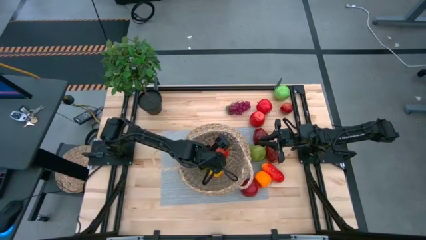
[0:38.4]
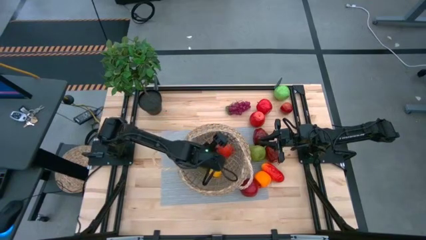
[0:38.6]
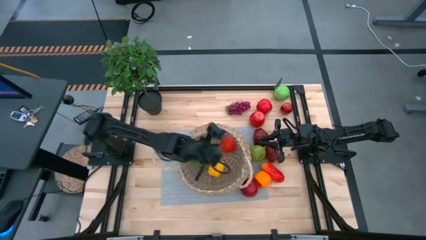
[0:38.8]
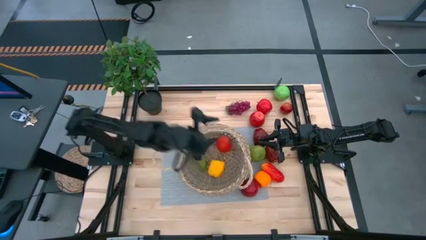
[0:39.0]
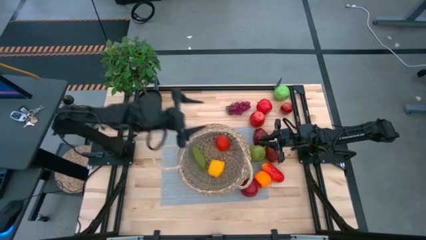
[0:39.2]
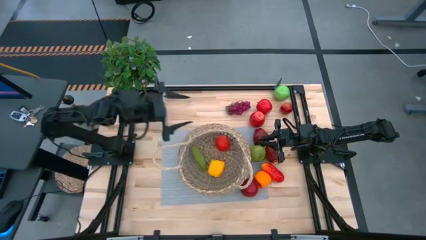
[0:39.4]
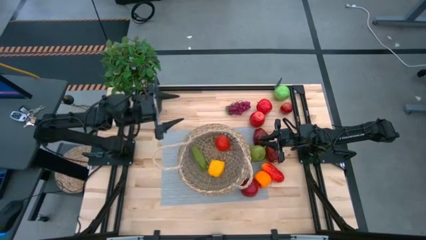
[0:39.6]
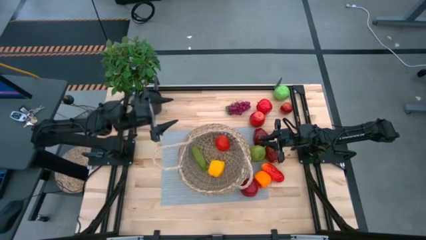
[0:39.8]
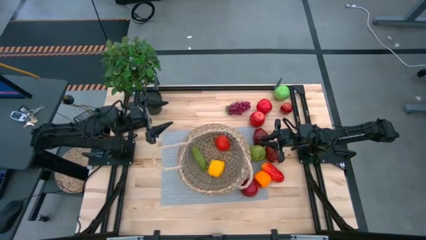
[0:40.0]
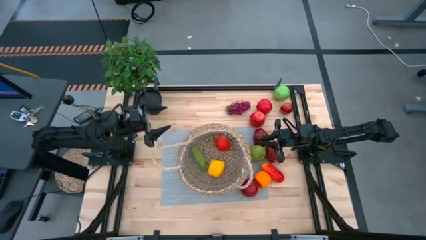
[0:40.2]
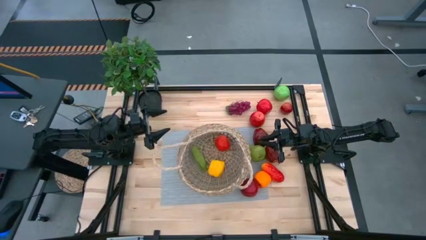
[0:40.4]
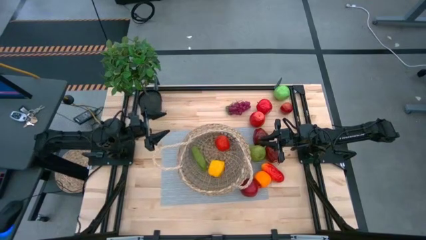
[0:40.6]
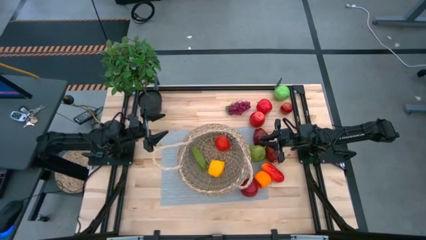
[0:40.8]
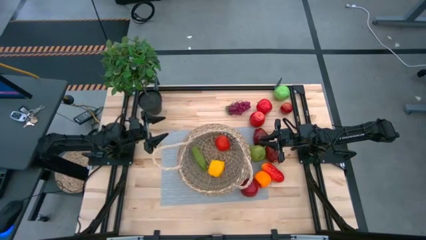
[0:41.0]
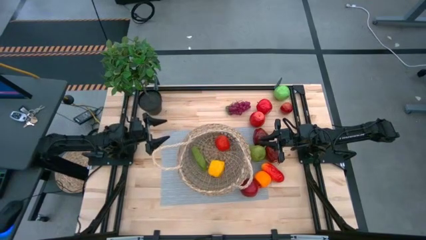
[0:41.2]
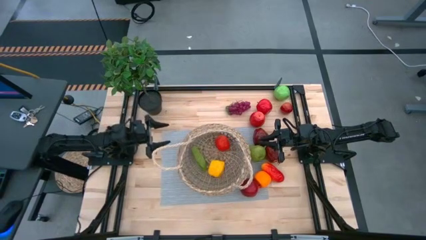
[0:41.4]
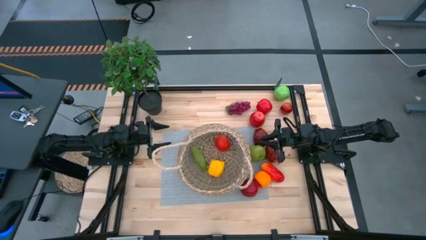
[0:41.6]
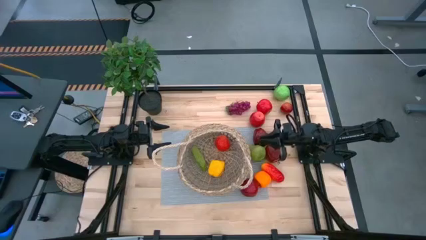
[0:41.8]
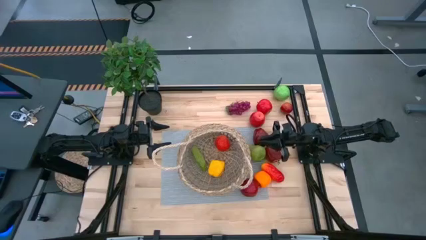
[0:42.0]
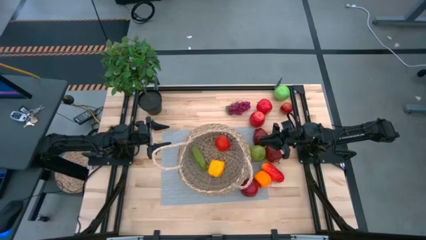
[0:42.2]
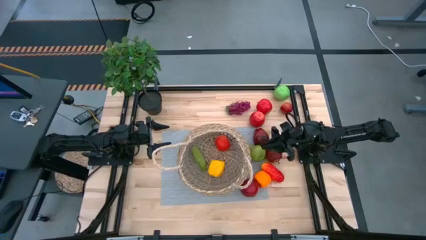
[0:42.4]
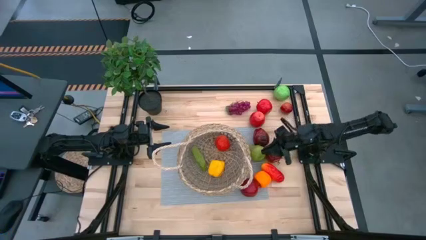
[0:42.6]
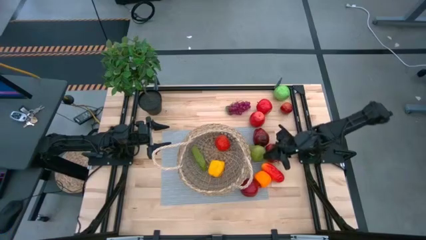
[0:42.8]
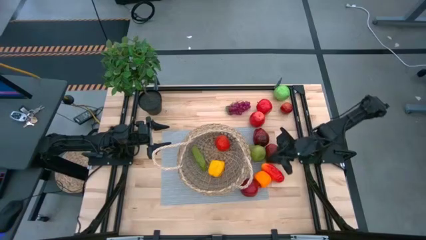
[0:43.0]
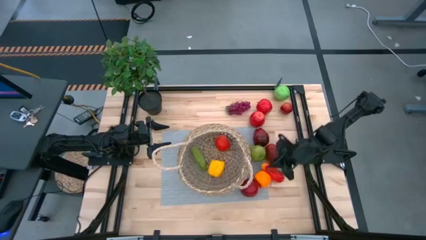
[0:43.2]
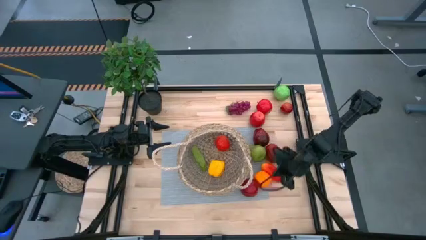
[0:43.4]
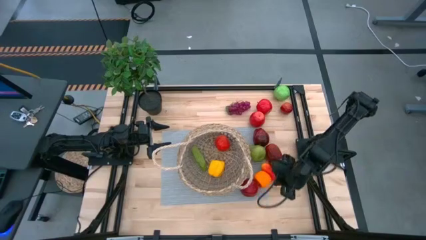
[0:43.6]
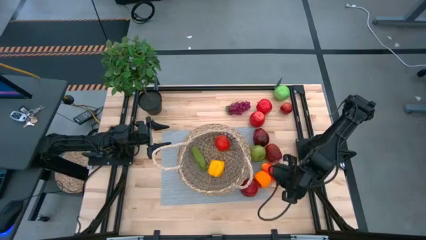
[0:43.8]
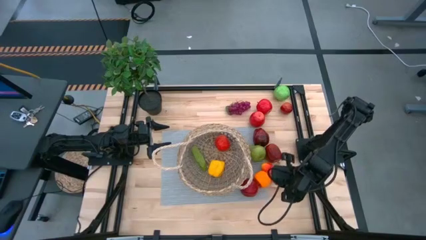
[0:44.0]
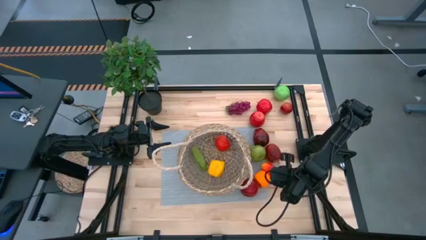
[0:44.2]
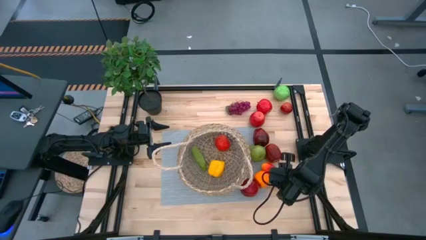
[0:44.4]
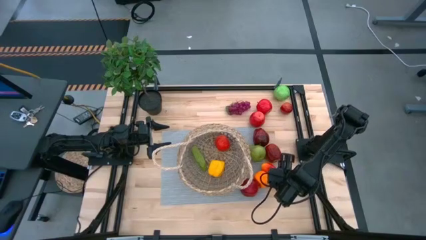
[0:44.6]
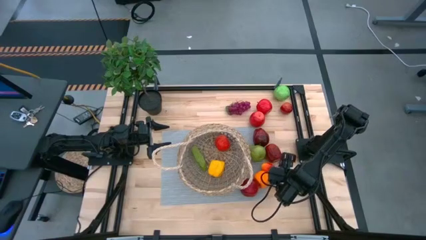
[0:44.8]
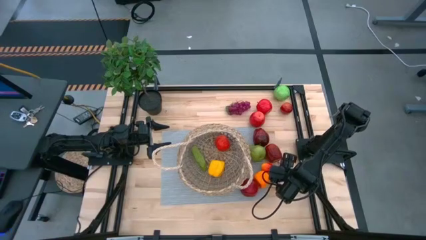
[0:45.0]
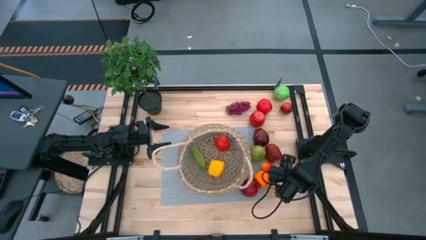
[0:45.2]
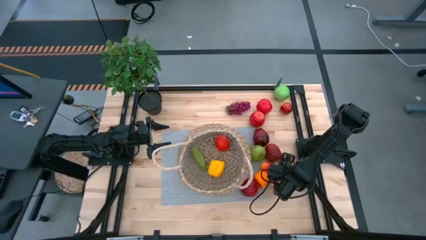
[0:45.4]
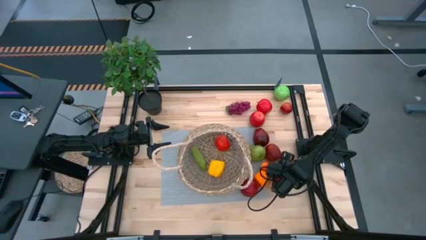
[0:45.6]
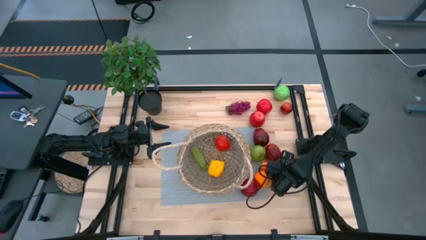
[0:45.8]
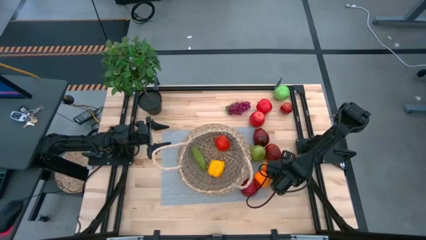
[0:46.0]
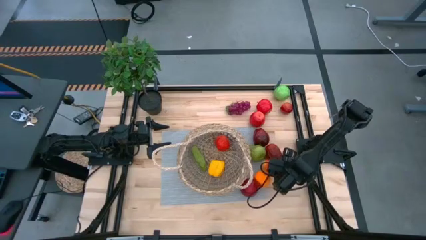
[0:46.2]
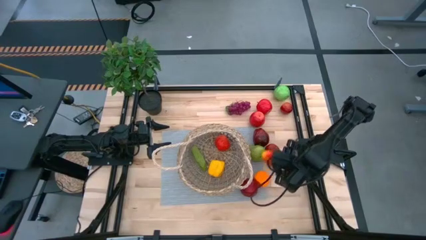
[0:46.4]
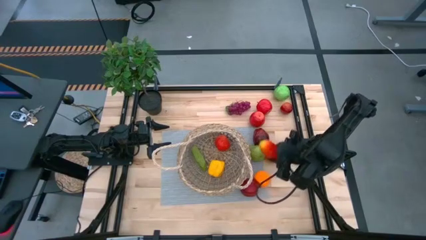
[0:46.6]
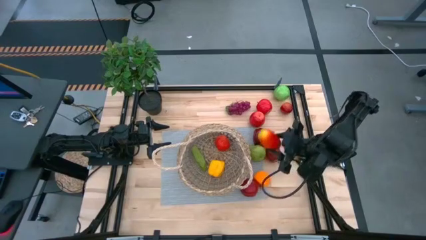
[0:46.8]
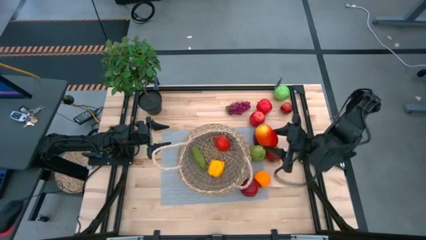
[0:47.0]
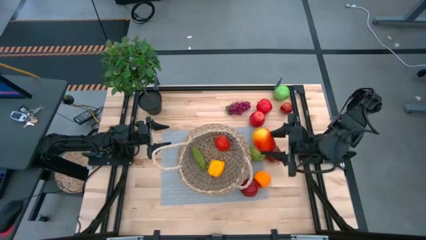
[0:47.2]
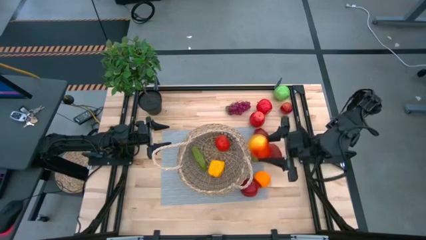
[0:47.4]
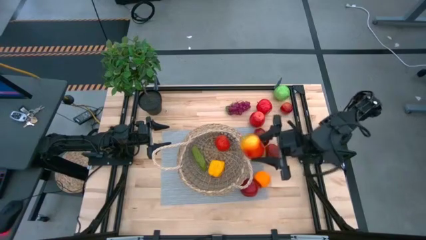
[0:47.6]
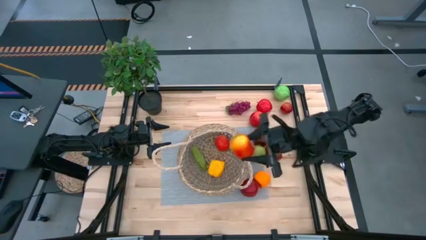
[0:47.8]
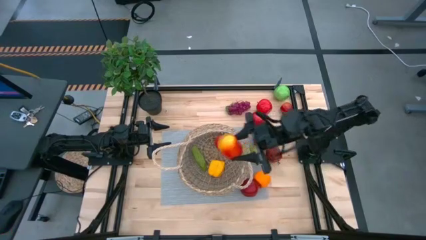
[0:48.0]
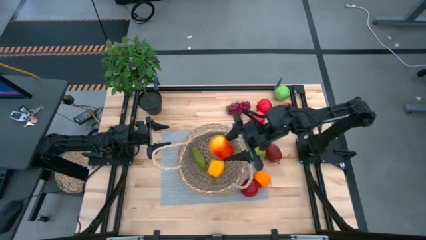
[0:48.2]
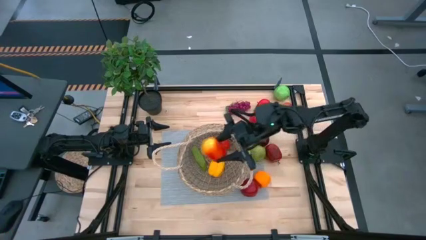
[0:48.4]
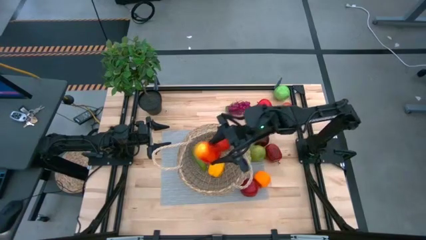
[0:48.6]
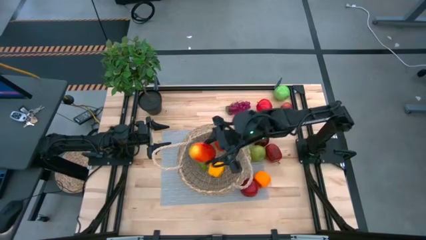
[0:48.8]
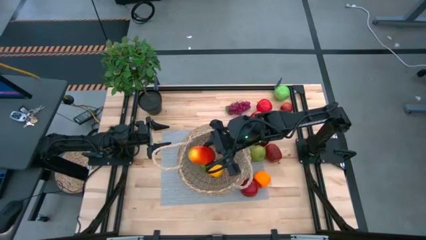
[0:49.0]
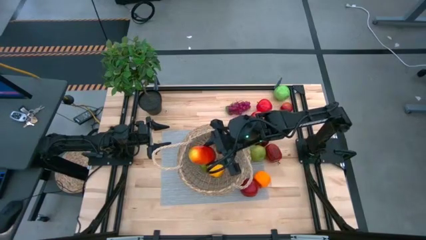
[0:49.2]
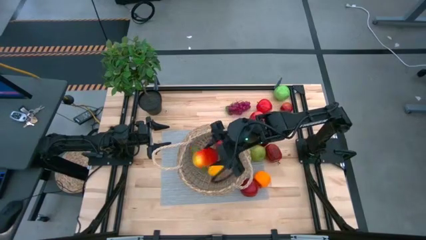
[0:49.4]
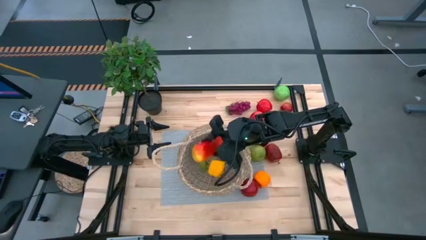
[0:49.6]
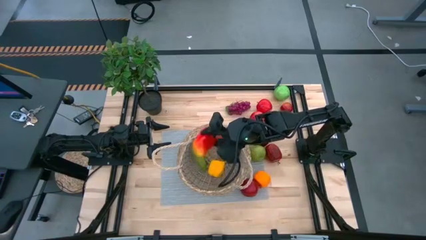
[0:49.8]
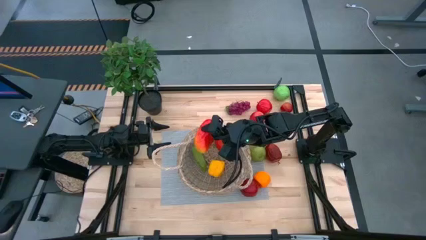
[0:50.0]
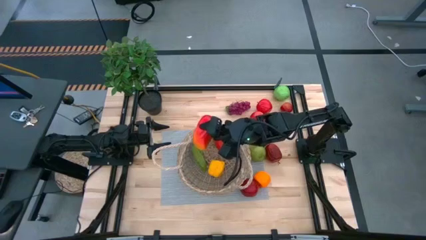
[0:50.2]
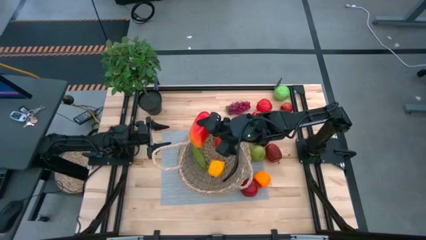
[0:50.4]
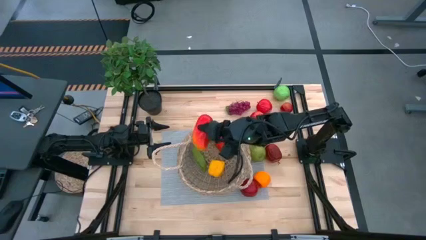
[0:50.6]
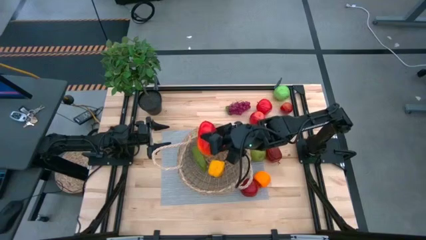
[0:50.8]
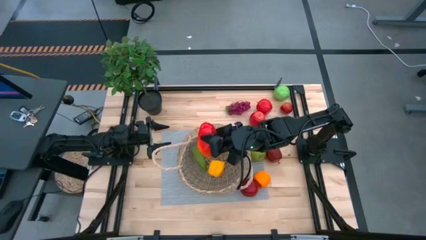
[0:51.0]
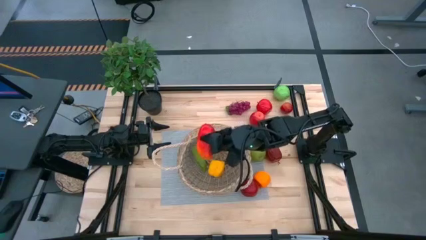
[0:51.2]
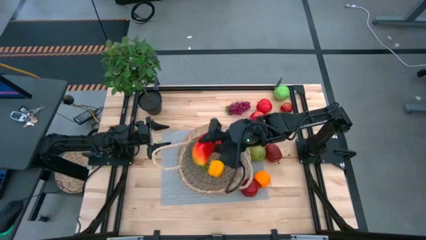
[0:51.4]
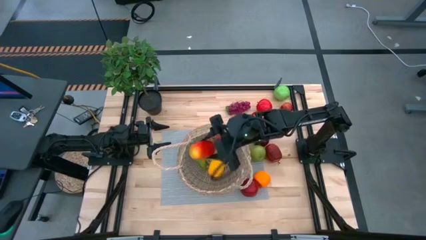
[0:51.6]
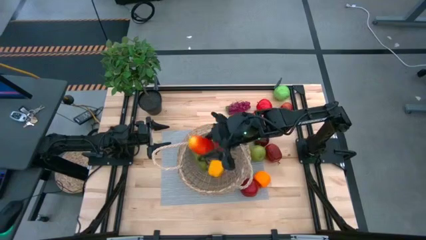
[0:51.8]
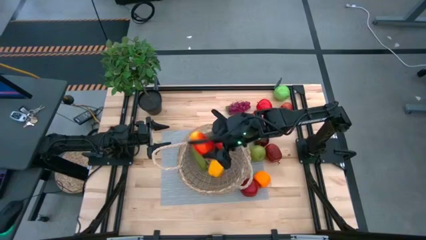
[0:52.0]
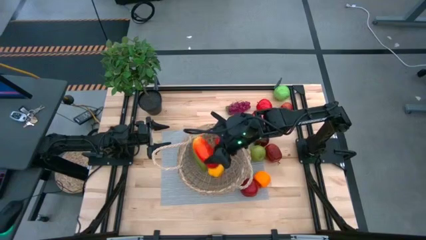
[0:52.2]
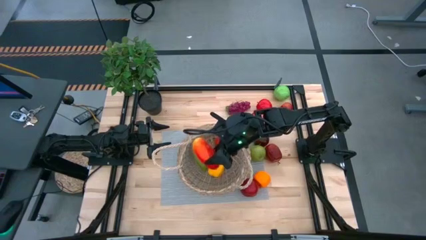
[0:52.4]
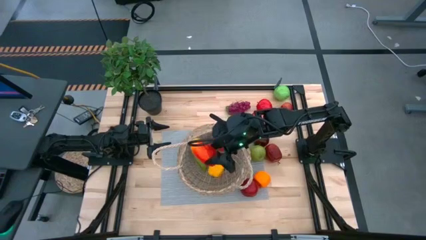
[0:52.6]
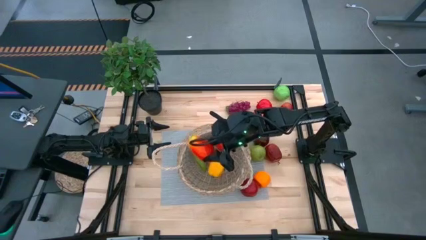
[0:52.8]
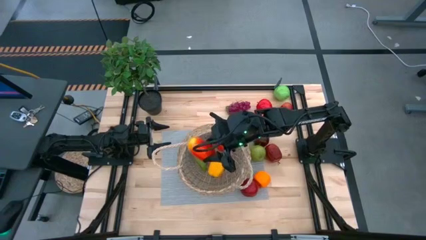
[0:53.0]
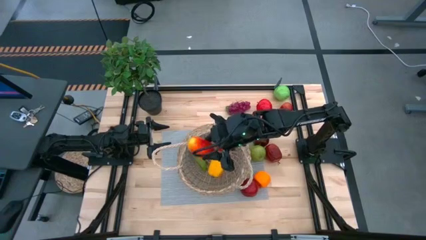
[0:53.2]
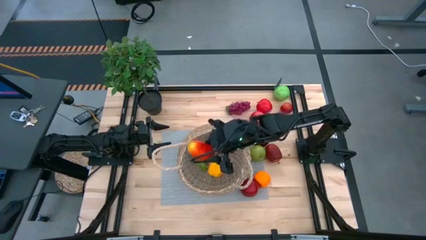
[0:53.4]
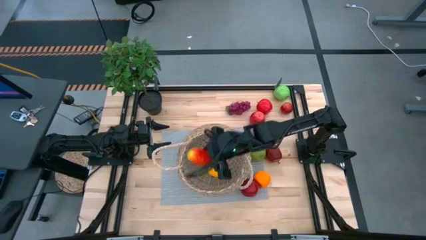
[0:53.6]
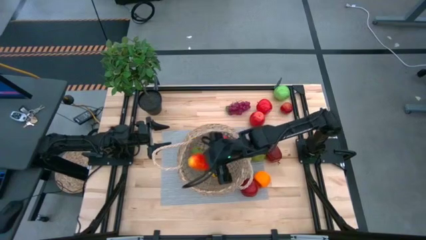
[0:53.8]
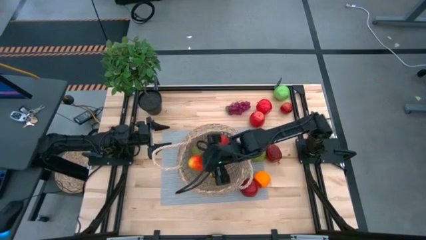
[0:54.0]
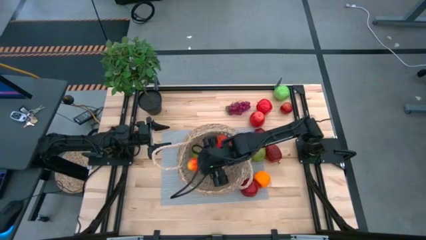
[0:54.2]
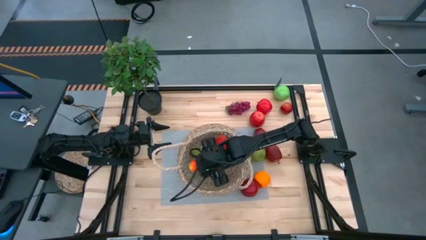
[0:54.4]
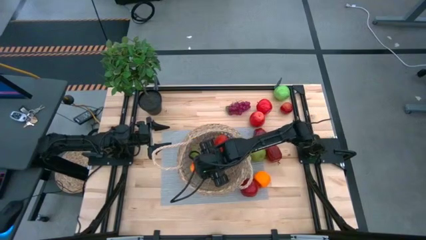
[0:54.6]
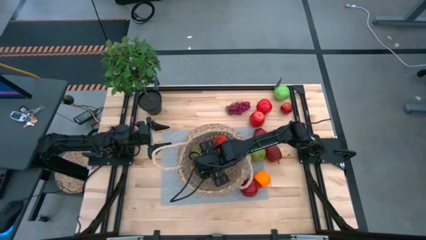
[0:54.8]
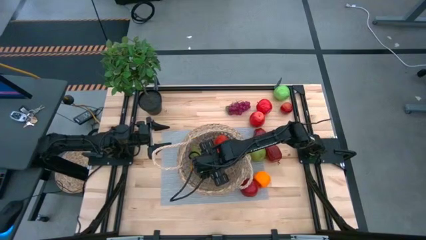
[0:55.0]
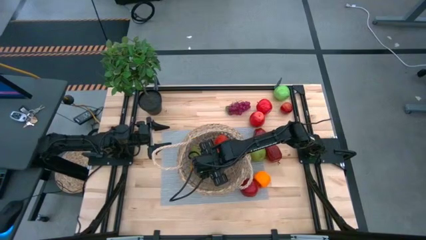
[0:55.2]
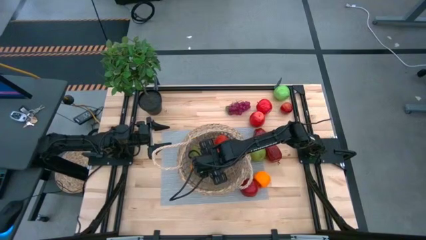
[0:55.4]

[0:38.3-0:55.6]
Task: Build produce basket
Put the red mango into the basket

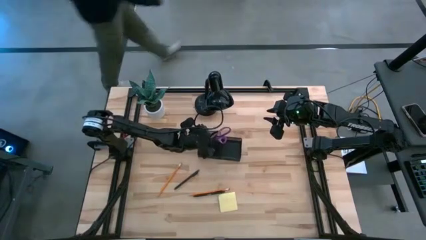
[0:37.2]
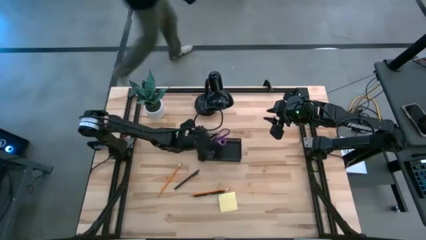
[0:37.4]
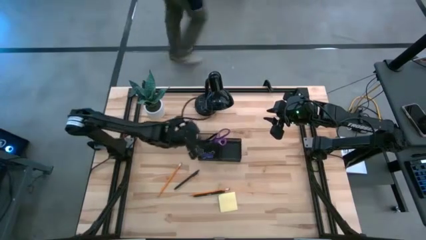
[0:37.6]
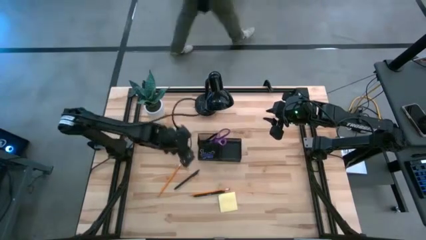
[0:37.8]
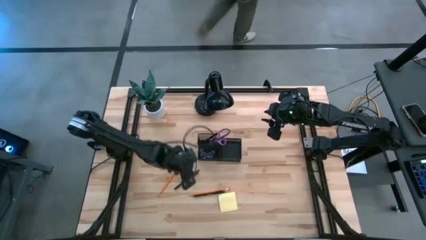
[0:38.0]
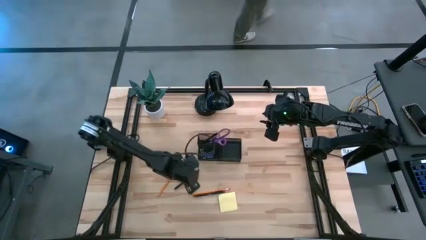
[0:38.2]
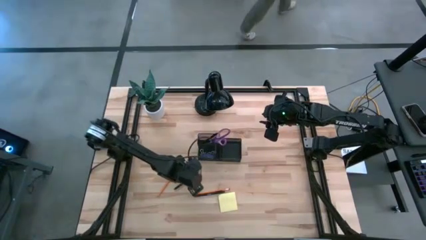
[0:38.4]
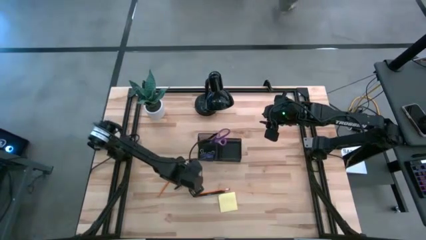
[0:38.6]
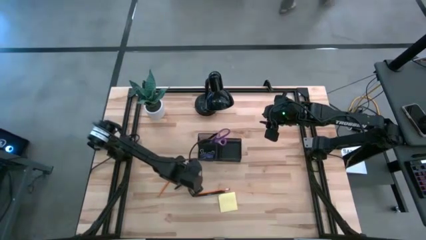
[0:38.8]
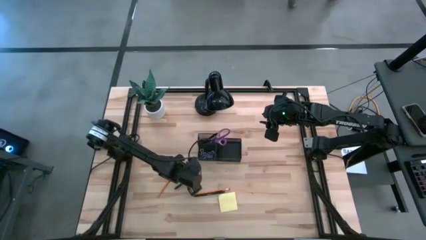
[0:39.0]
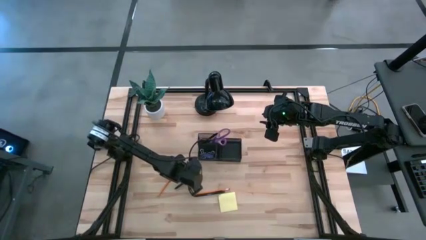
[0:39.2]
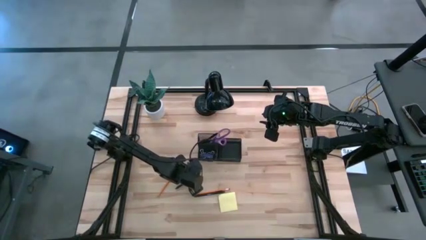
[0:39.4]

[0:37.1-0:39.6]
Task: Pick and place office supplies into organizer
Put the top black pen into the black desk organizer
